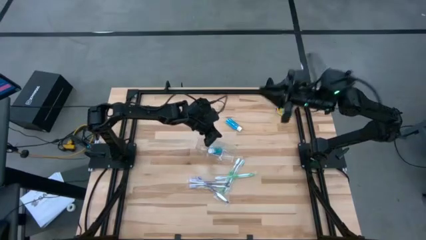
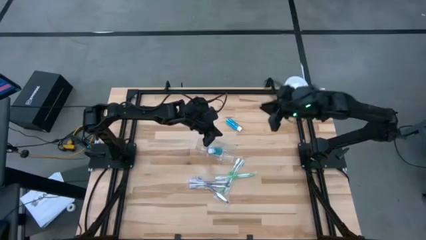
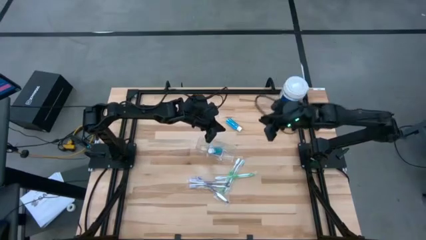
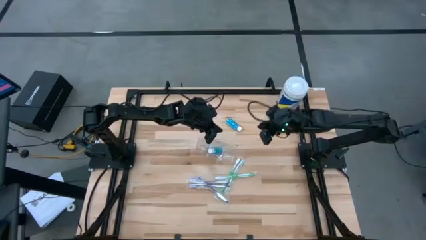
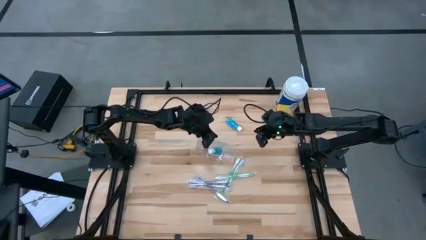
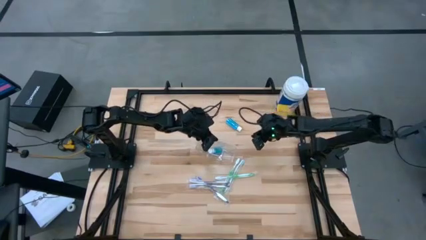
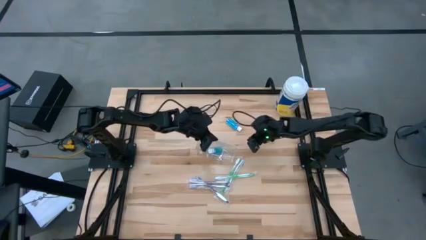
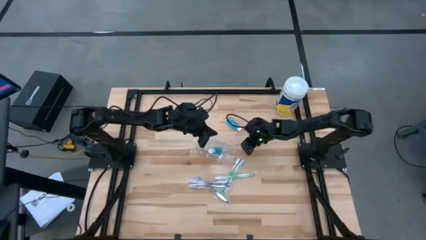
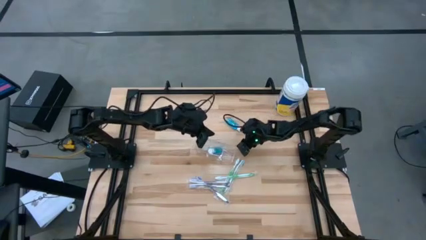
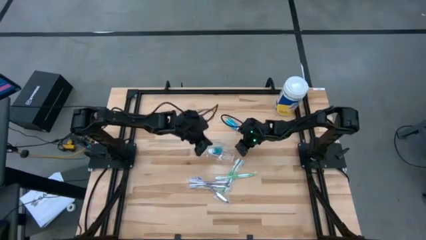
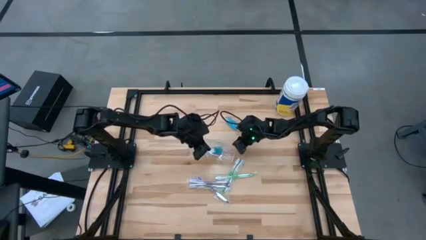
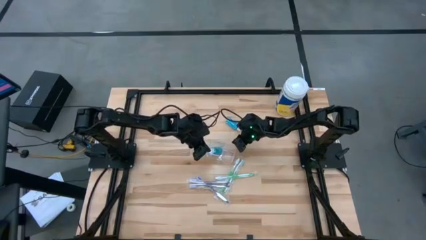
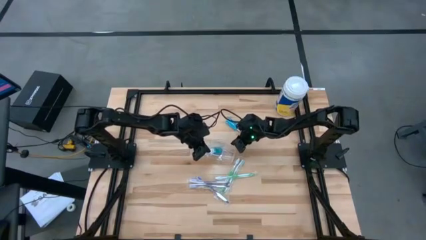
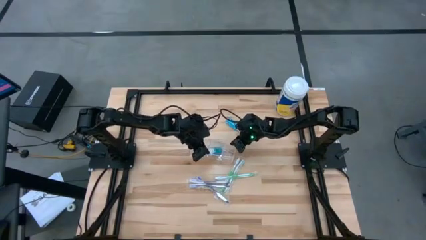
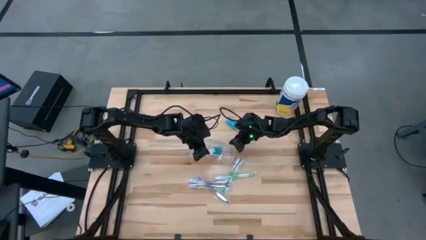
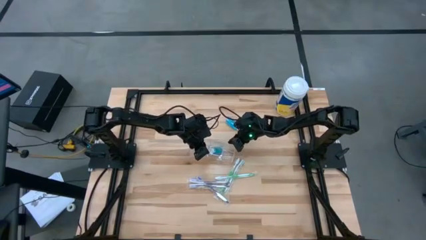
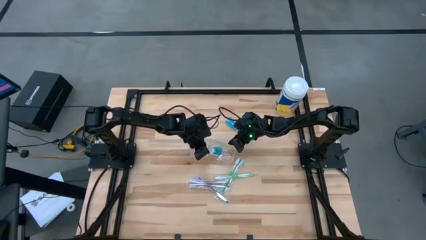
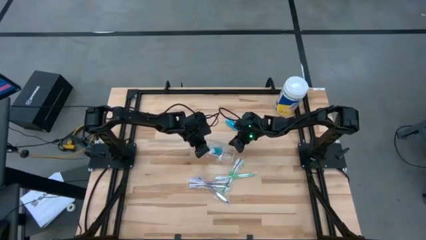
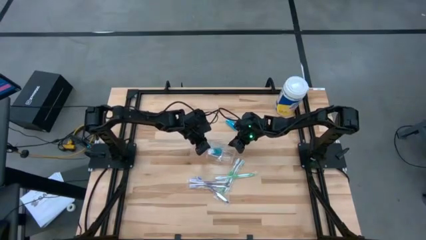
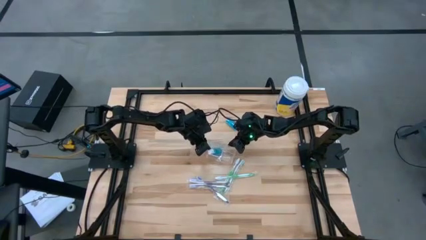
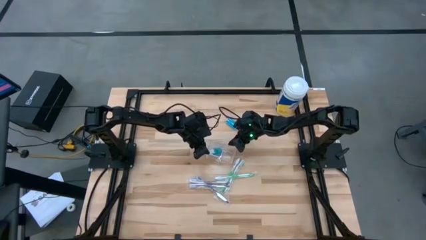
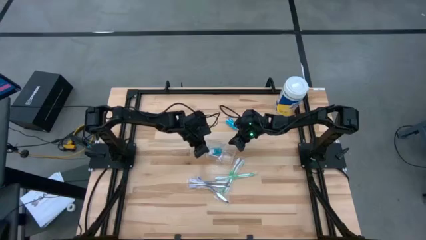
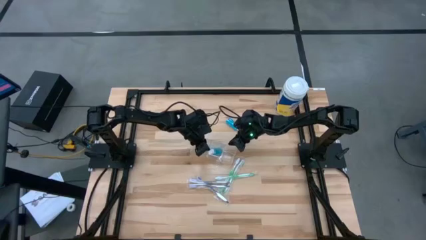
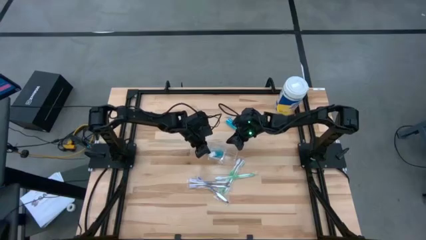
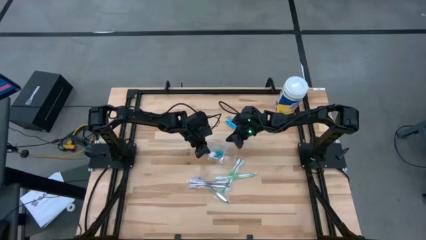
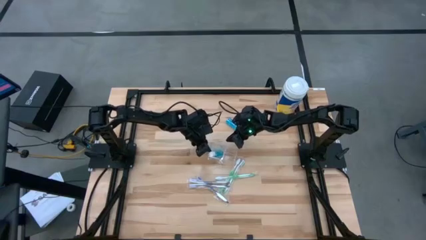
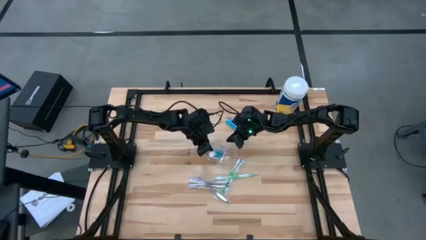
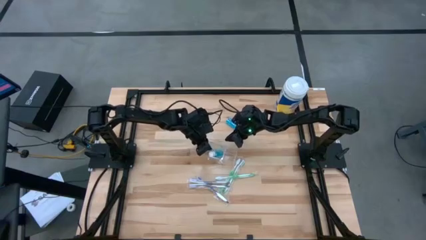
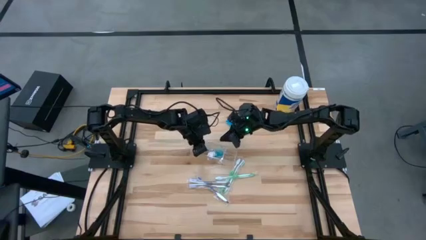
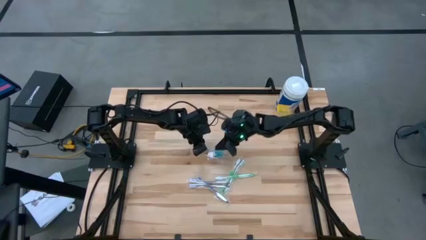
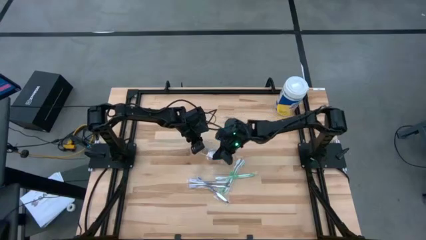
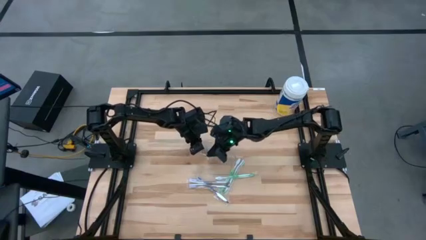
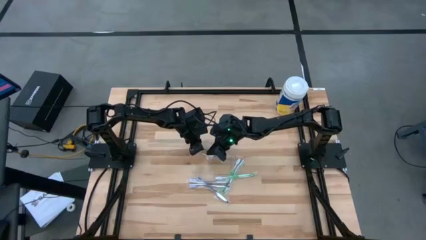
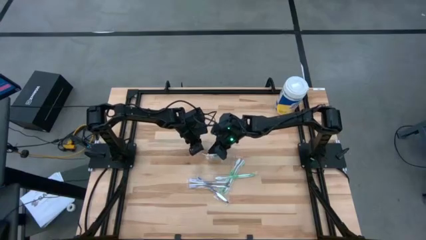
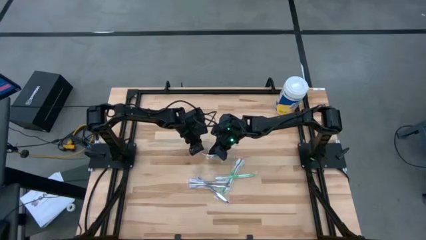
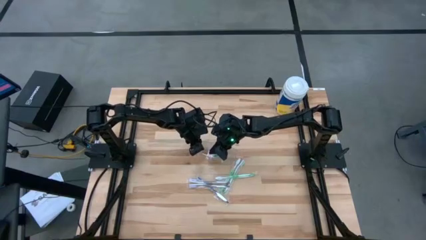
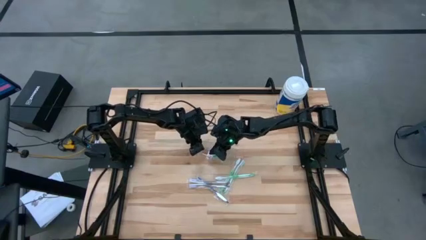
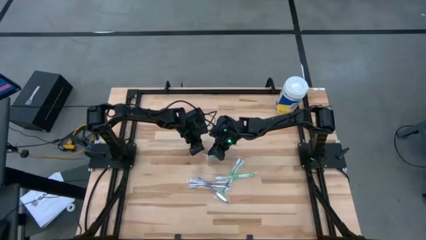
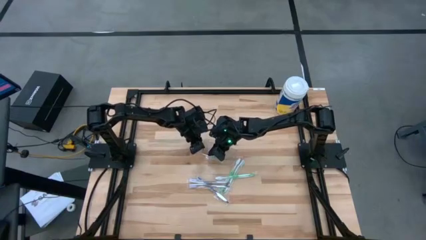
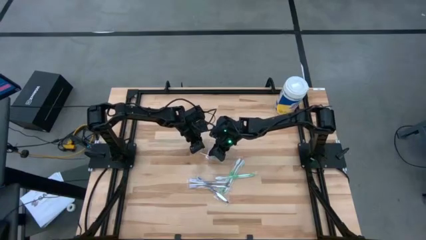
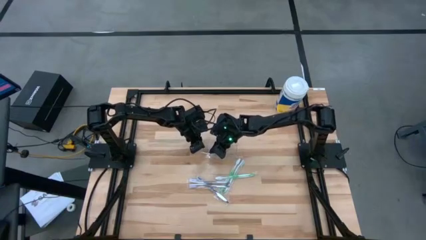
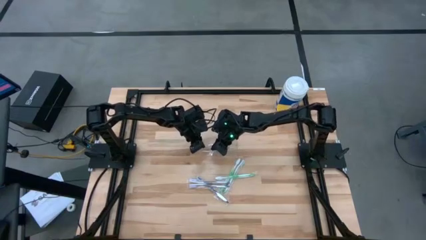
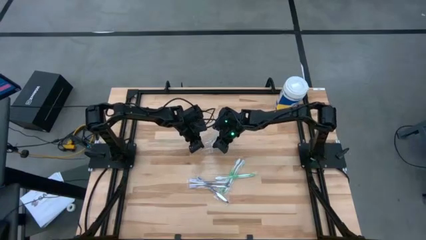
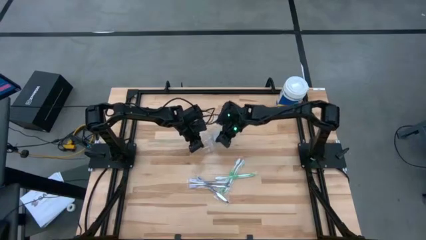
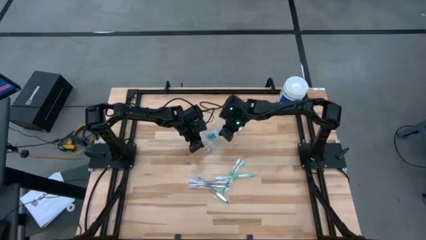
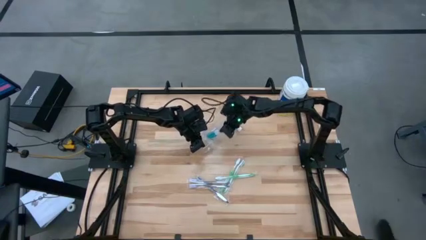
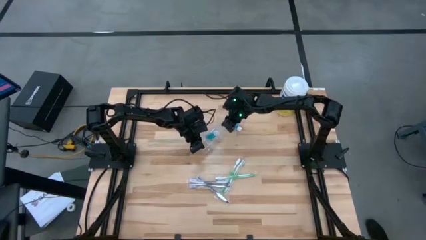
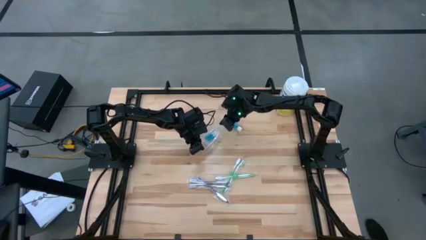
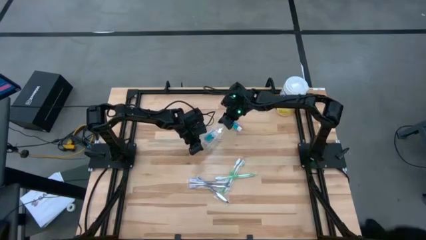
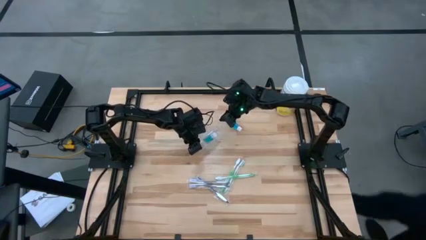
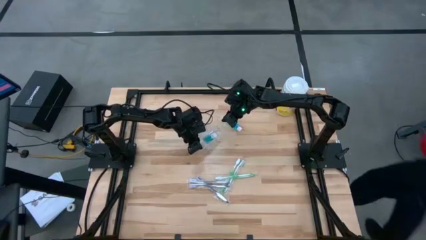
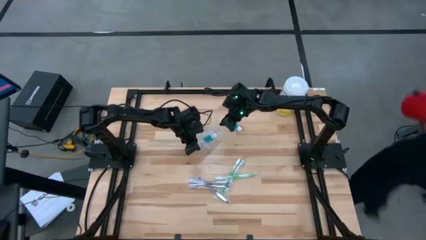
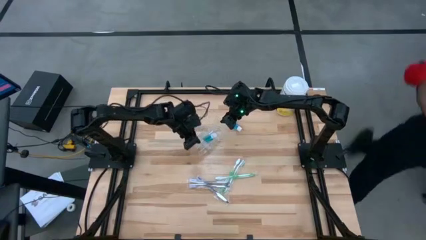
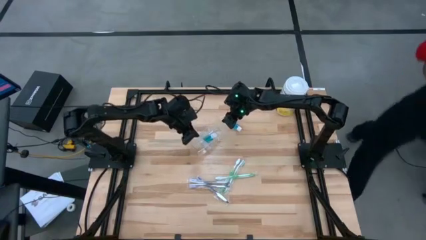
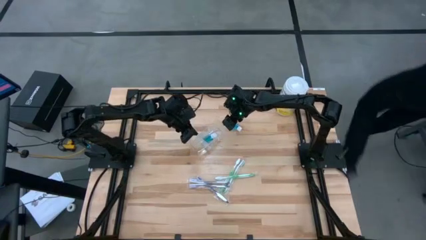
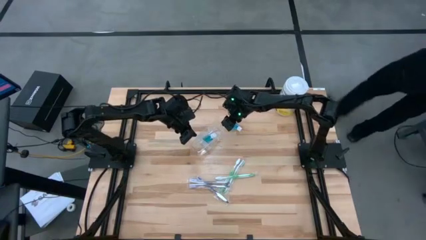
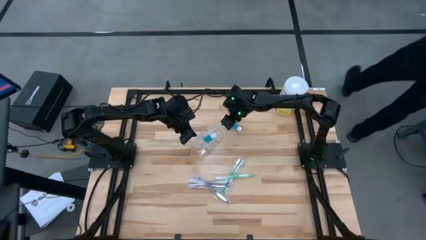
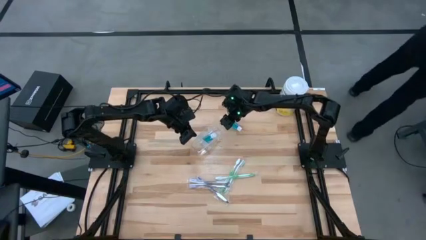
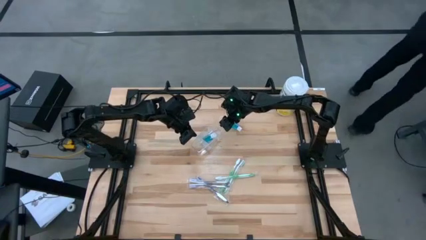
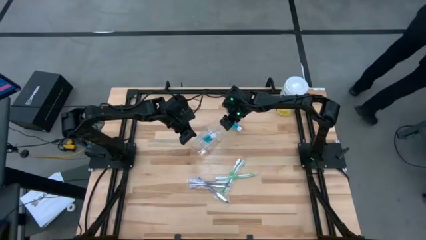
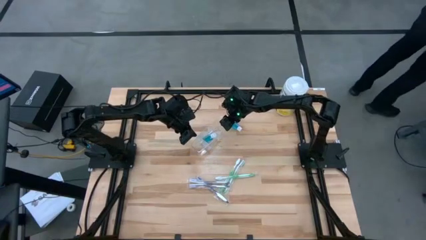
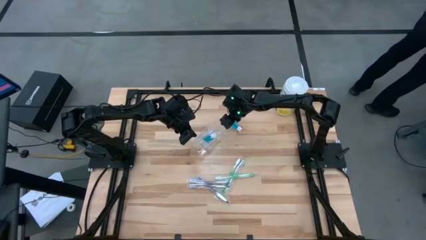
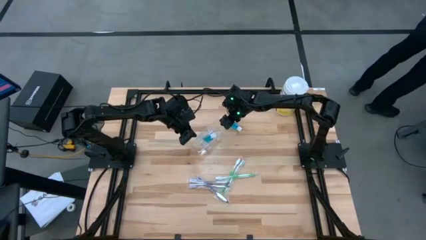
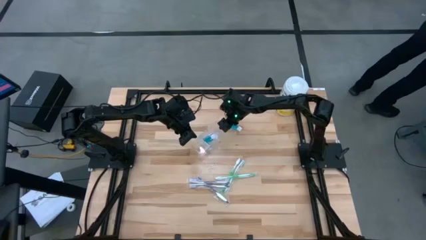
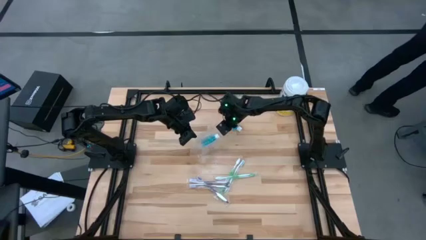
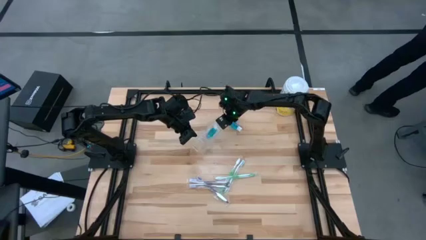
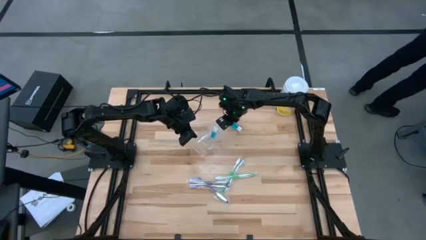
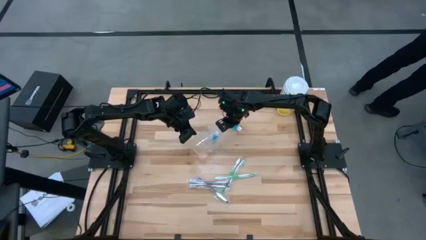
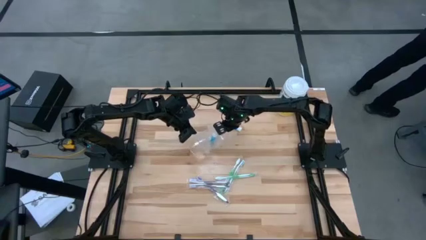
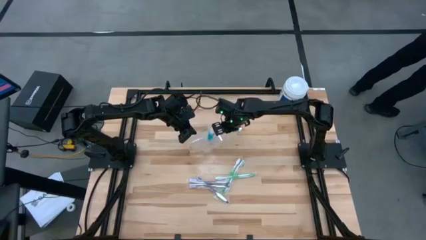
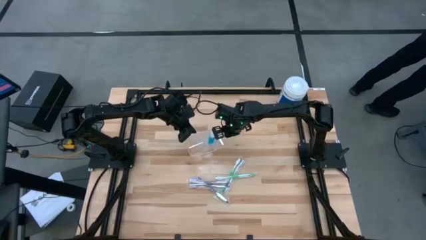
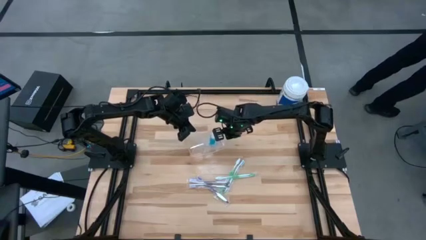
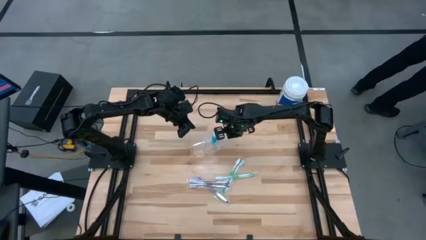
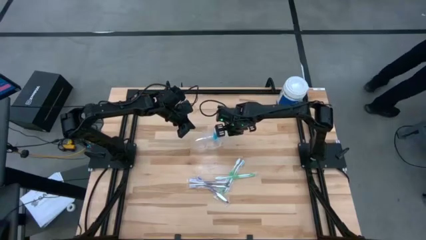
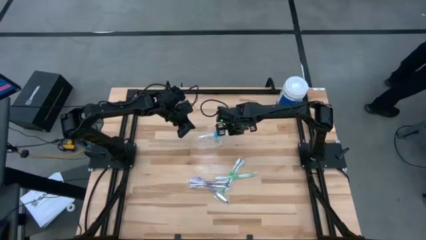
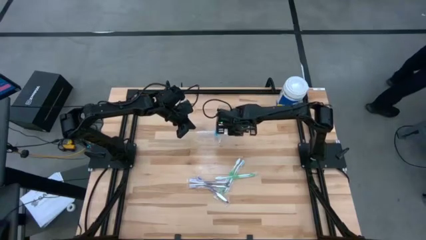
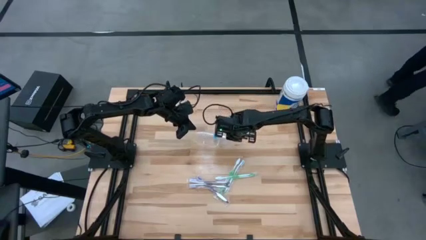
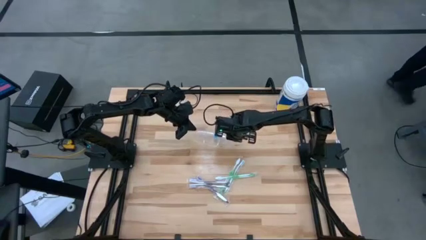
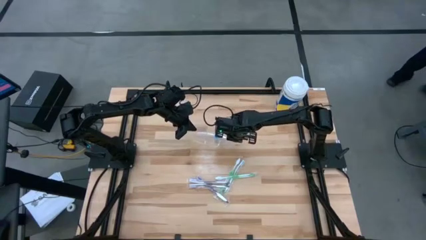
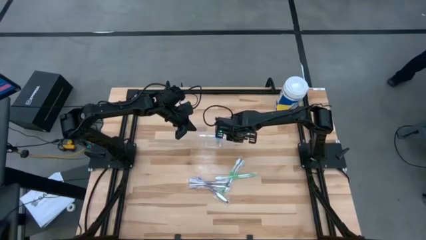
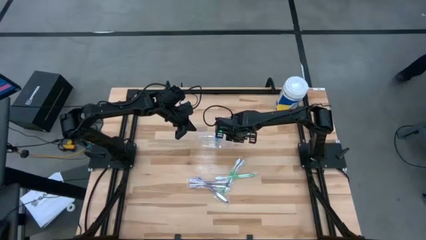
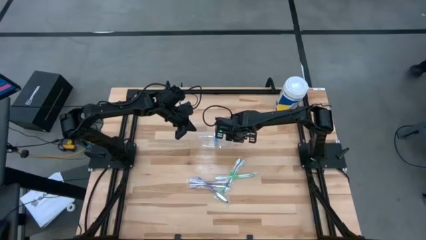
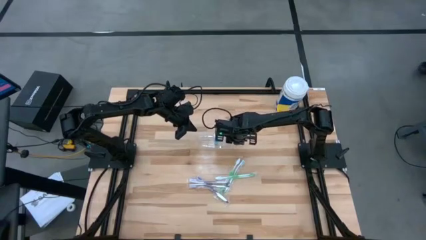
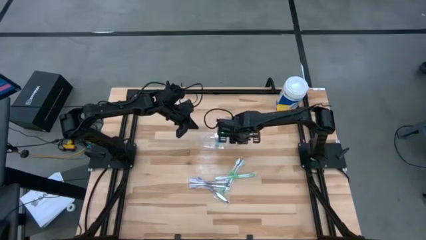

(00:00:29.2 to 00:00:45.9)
Task: Pick & Place toothbrushing station
Adjust the transparent organizer on the table
